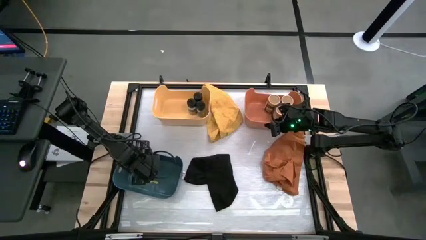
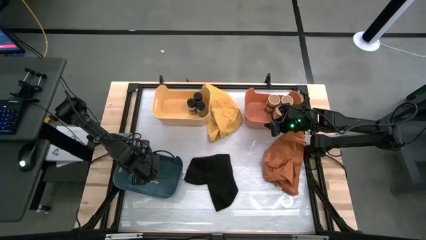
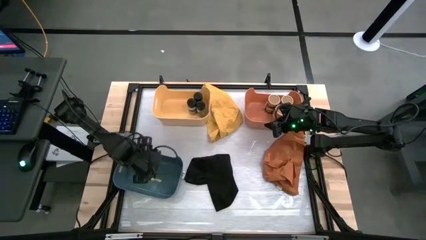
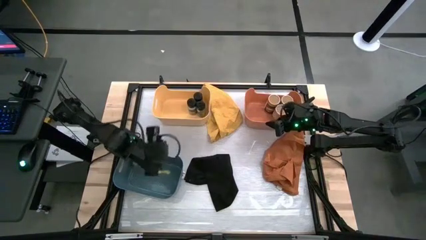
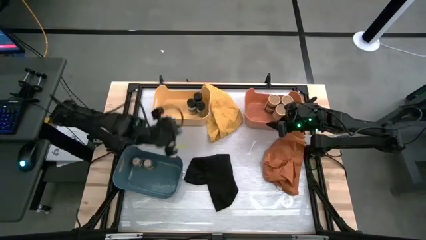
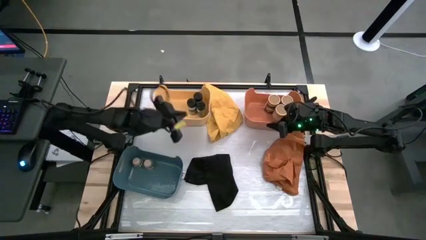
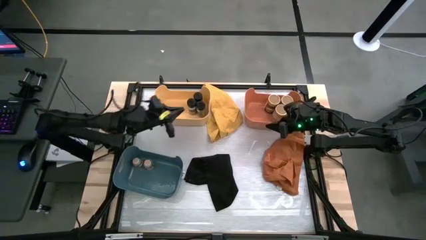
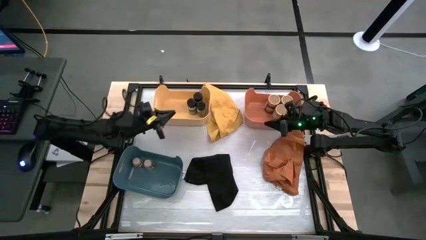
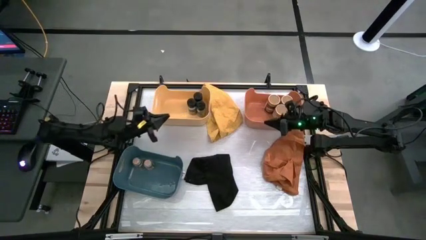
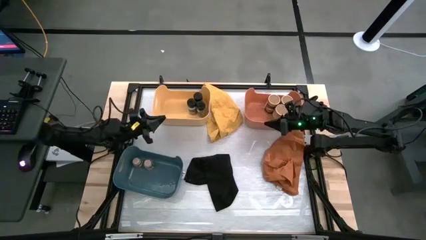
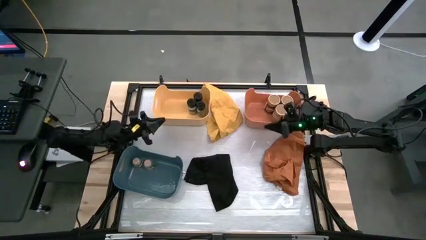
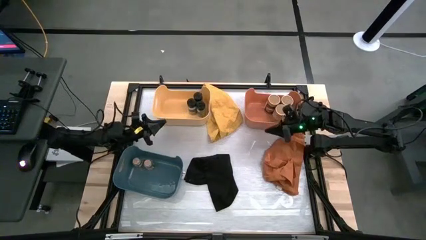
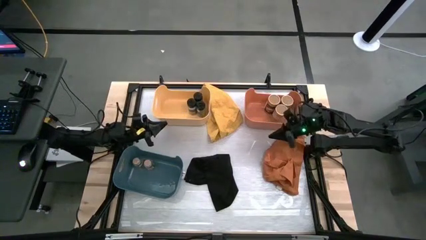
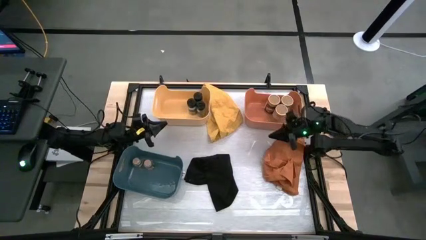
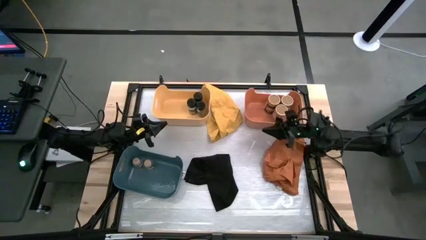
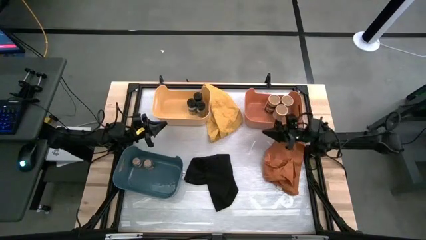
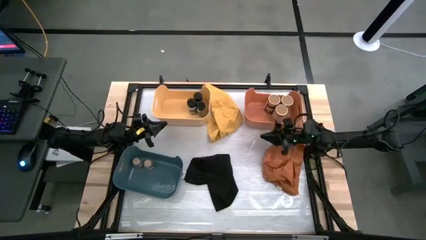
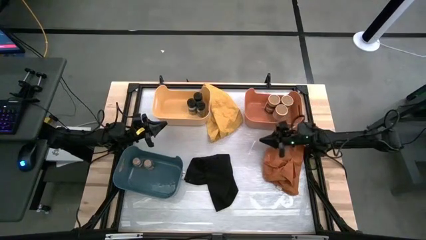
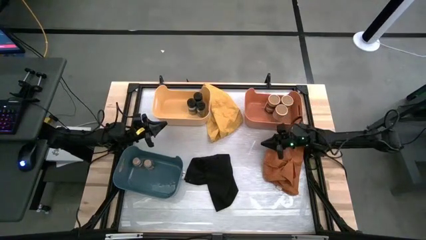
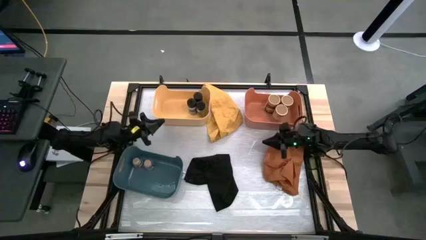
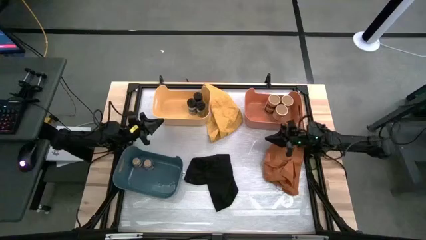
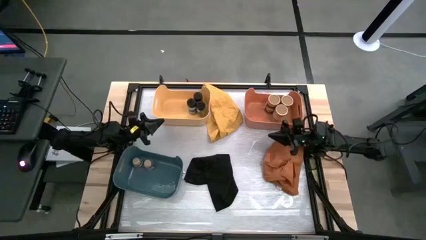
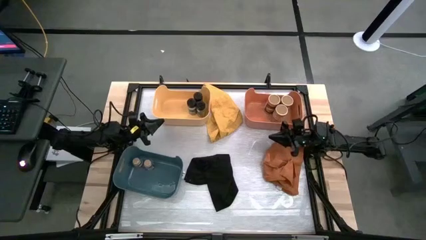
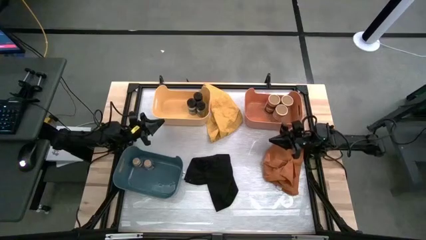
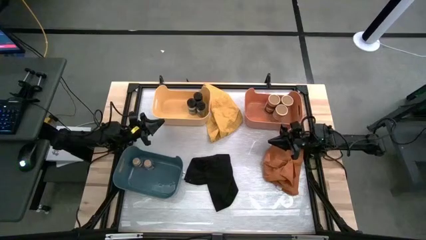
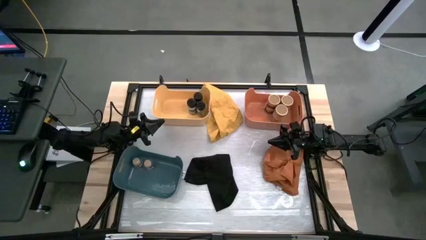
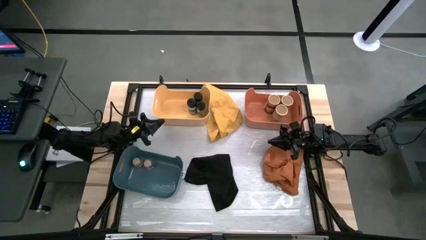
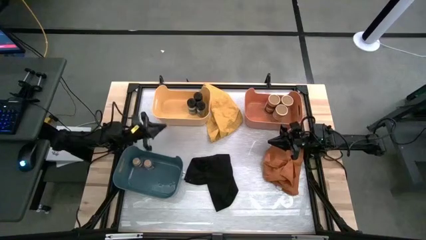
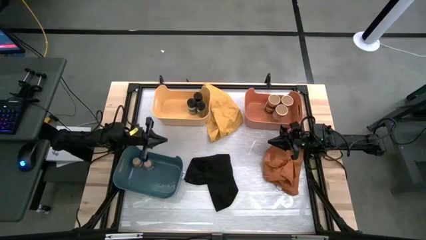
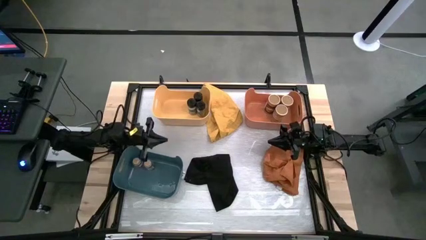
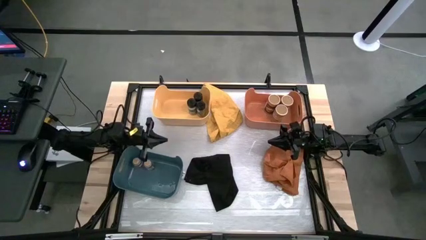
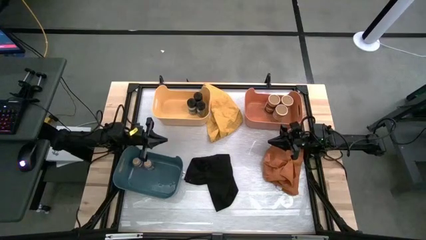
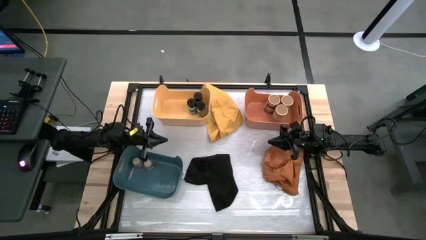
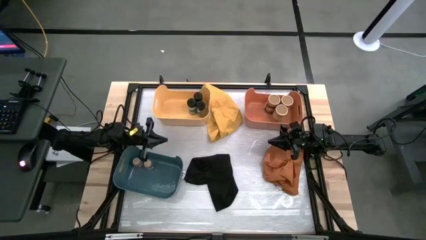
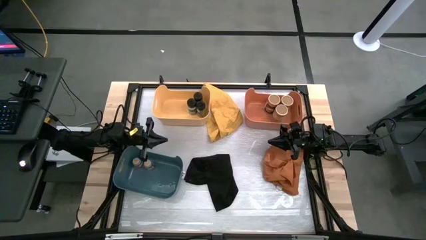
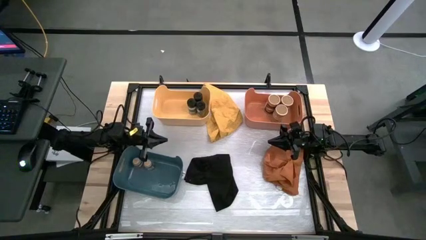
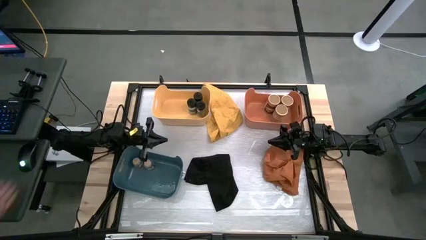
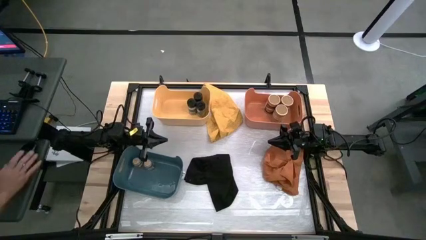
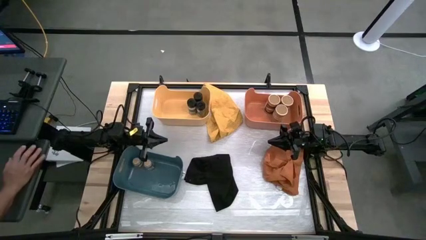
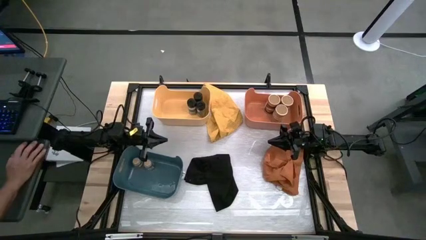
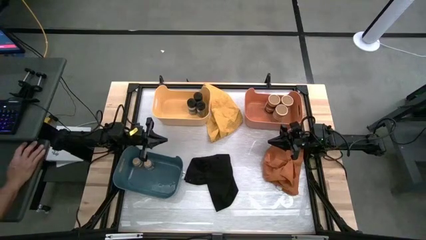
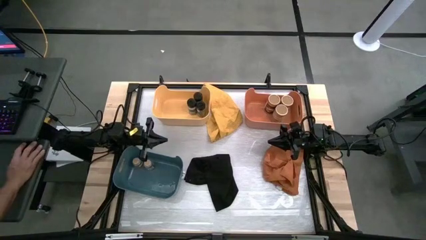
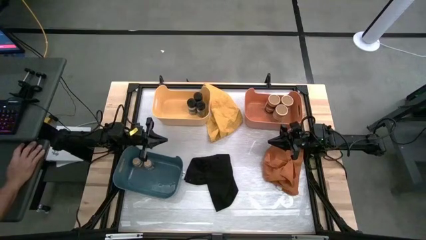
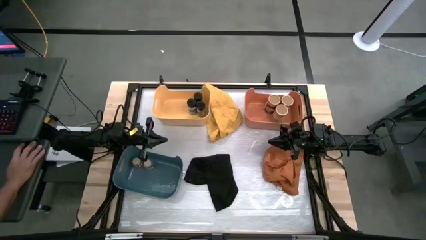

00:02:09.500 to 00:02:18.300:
Task: Sort spices by type
Return to Home Position

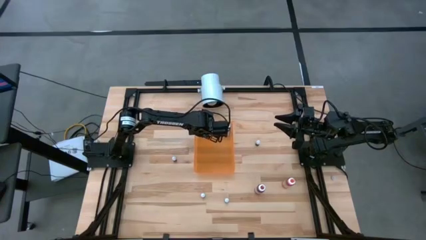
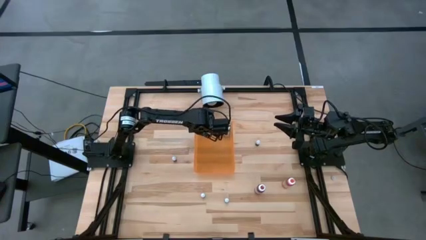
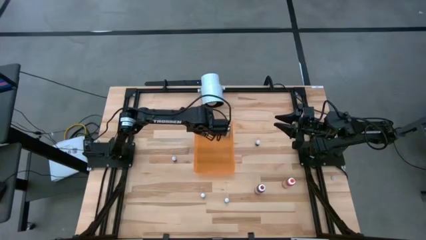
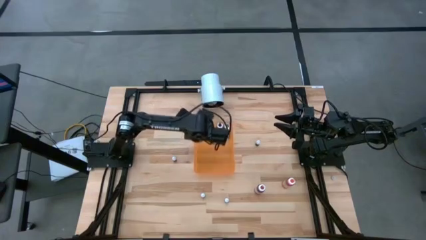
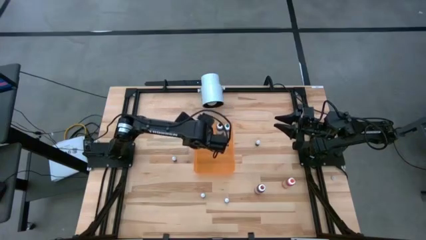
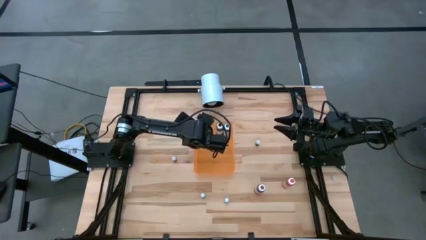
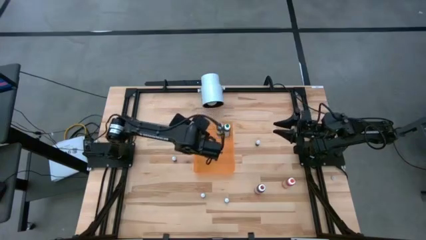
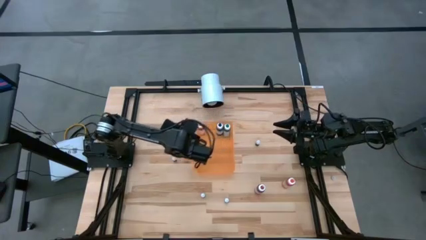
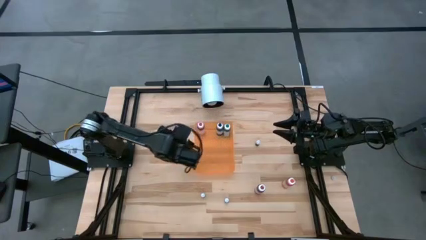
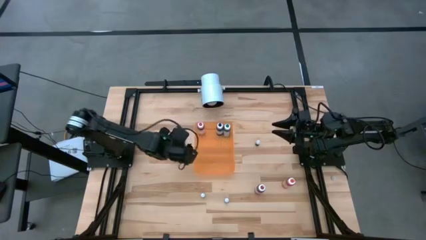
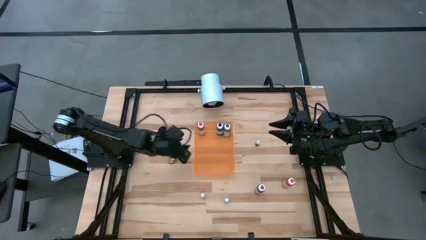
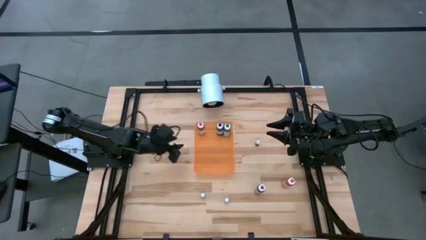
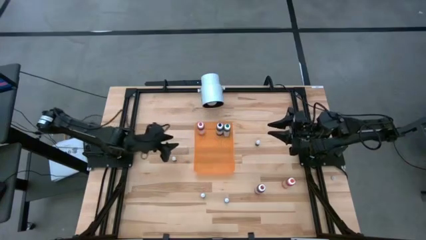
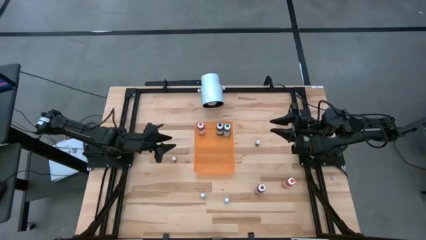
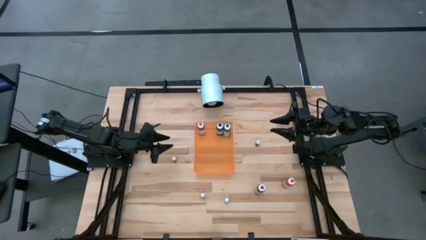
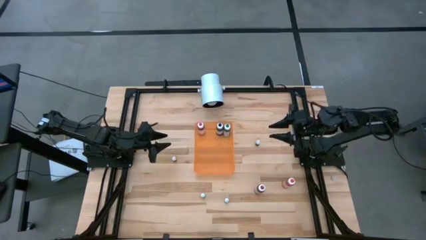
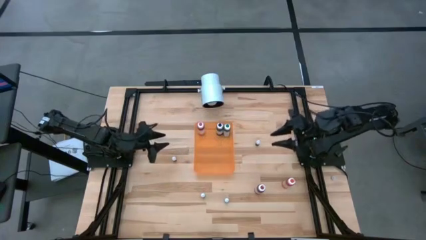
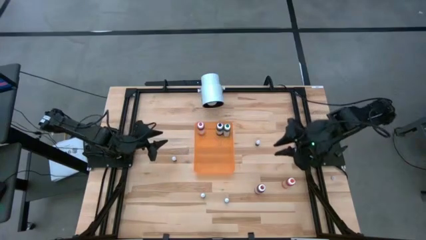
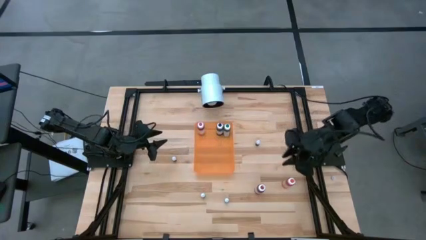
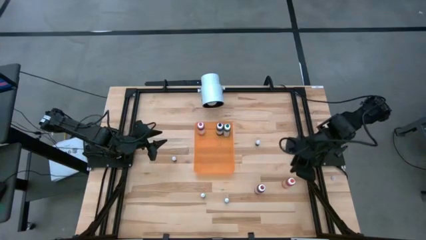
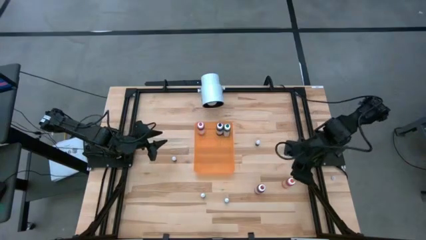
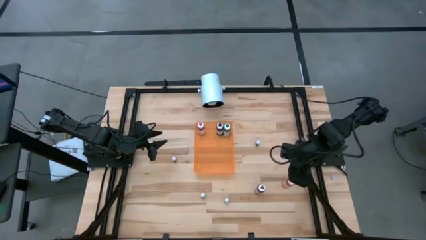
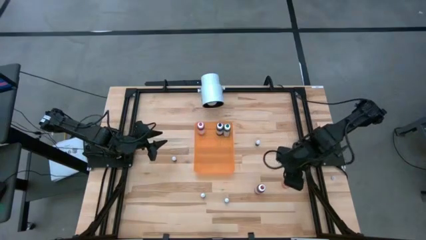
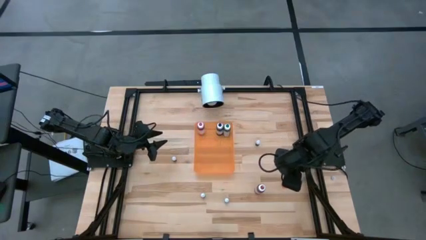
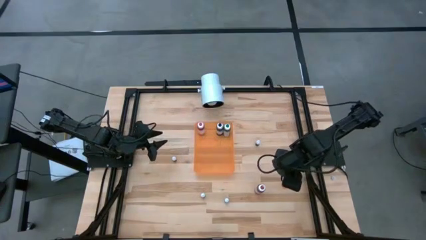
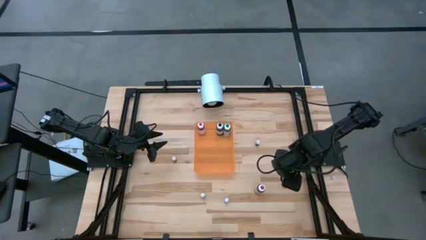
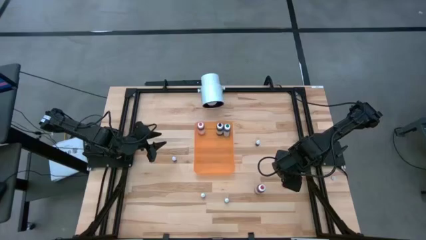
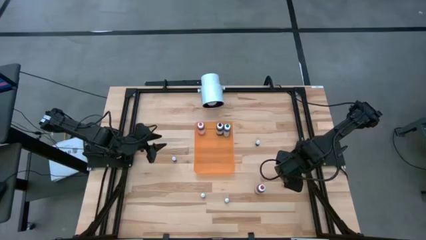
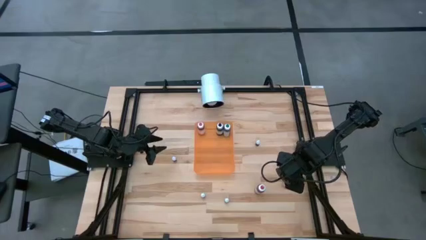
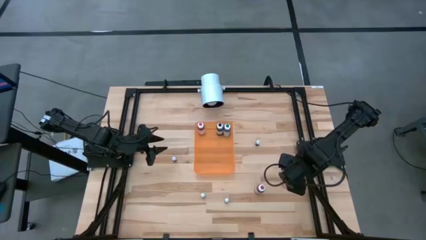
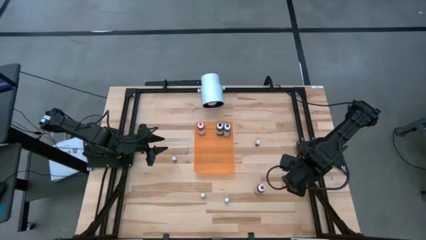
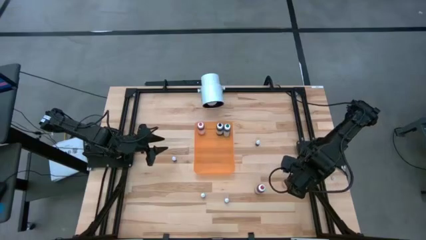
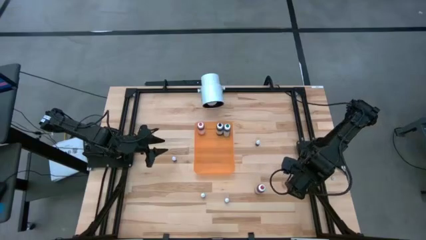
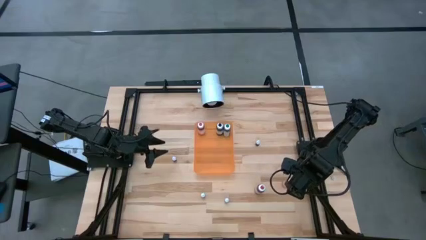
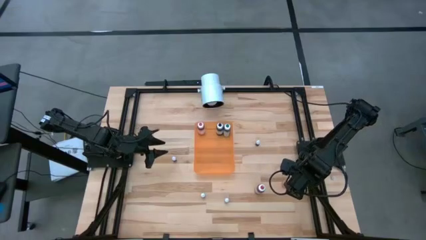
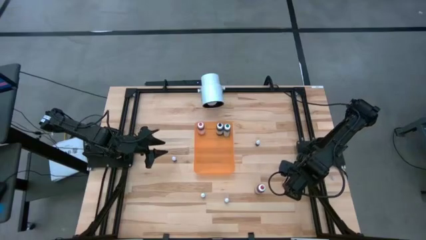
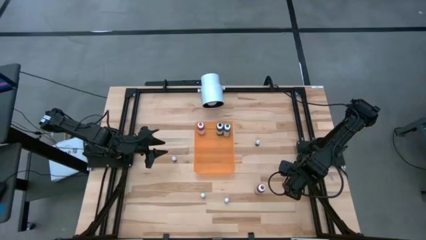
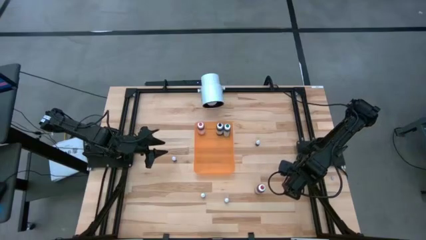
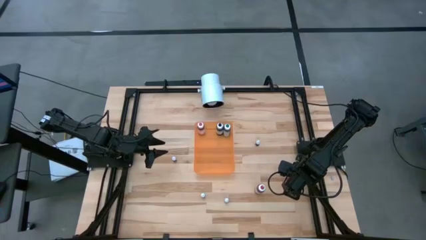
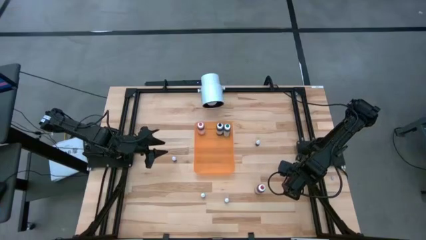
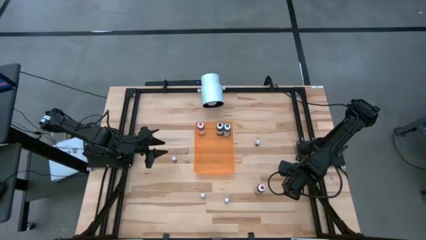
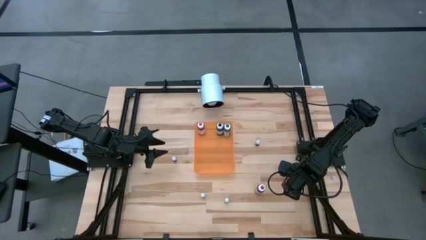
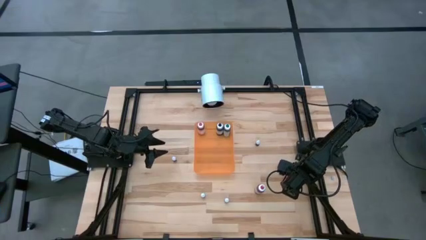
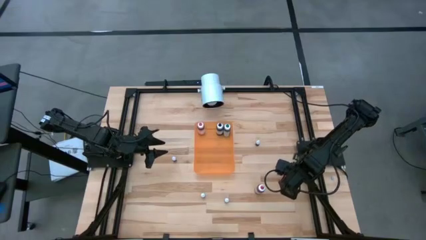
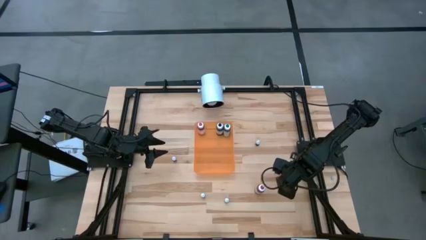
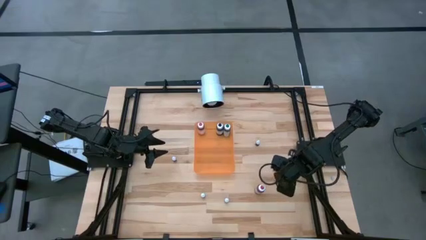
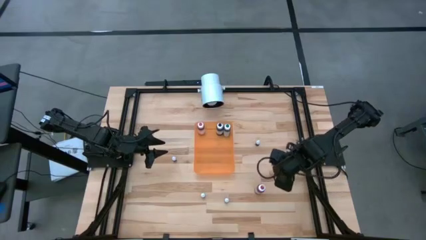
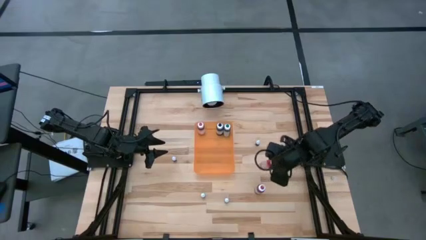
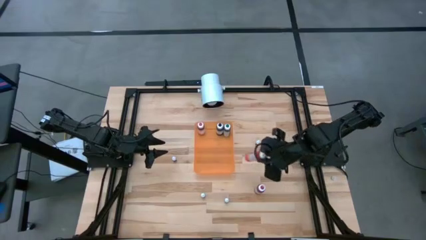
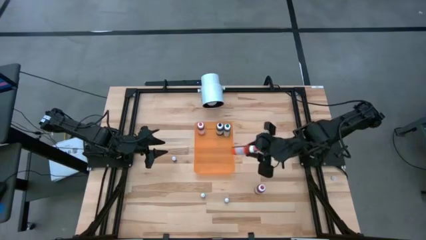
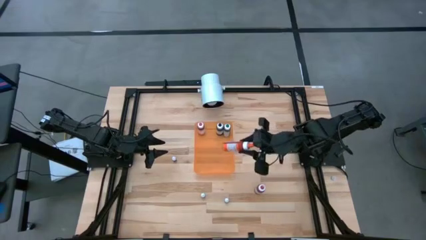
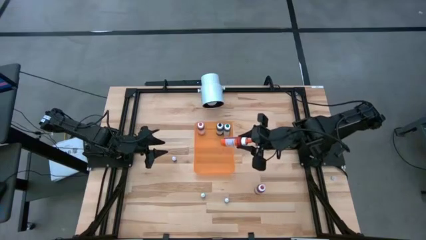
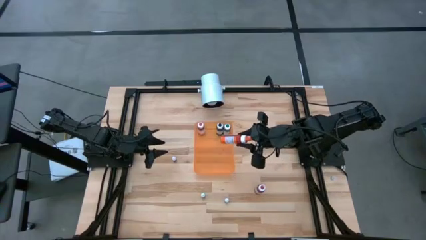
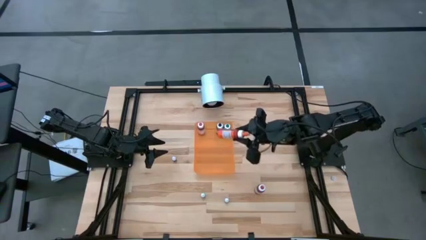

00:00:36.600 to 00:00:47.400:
Task: Pick & Place food coloring
Put the large orange food coloring bottle into the bin
